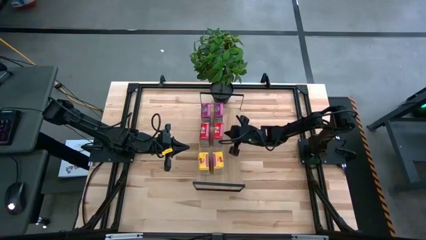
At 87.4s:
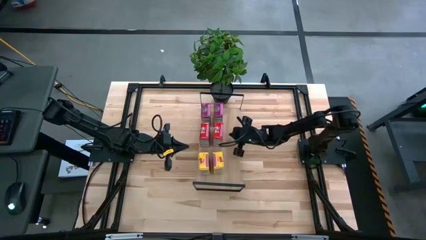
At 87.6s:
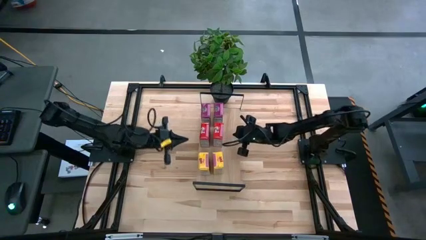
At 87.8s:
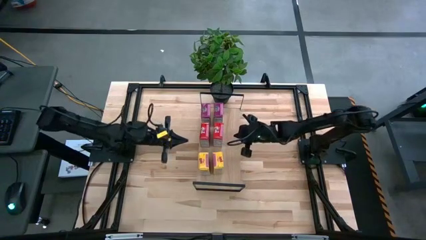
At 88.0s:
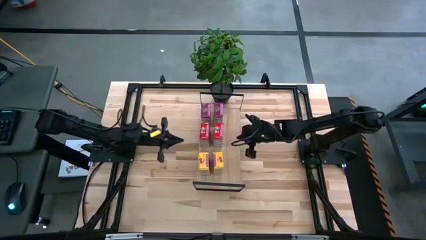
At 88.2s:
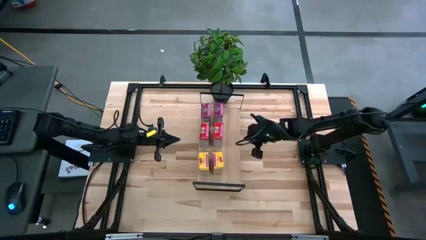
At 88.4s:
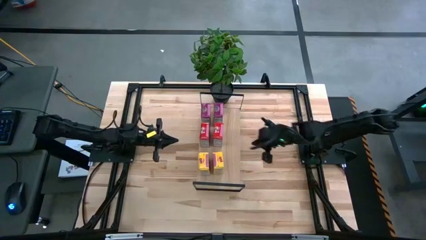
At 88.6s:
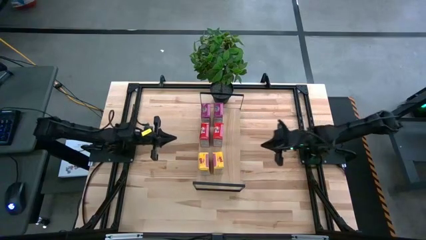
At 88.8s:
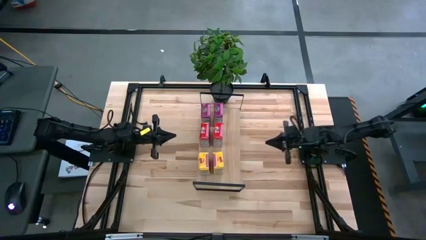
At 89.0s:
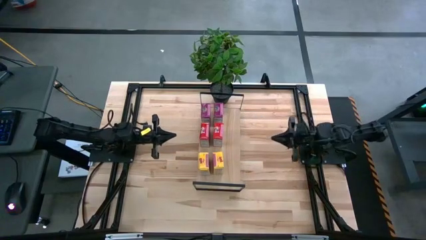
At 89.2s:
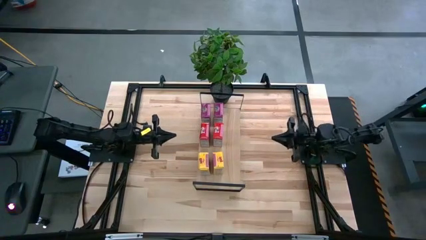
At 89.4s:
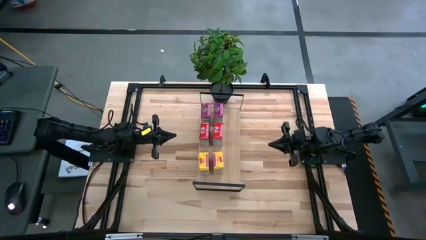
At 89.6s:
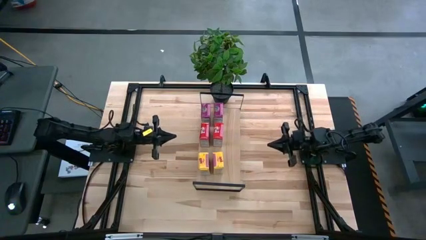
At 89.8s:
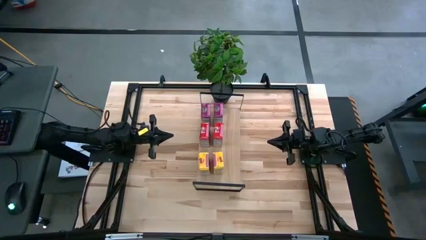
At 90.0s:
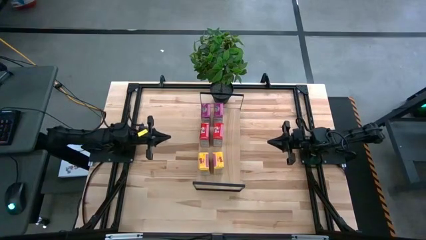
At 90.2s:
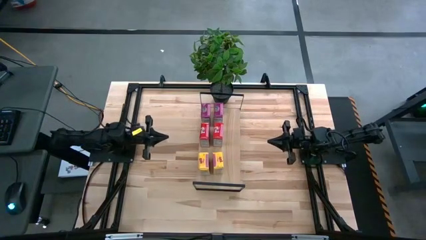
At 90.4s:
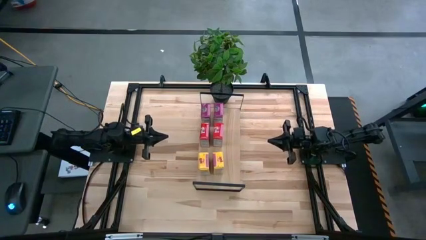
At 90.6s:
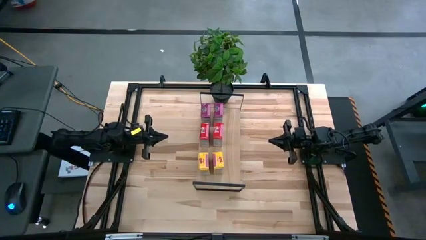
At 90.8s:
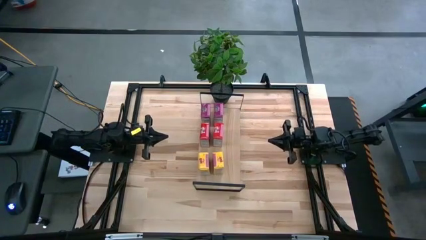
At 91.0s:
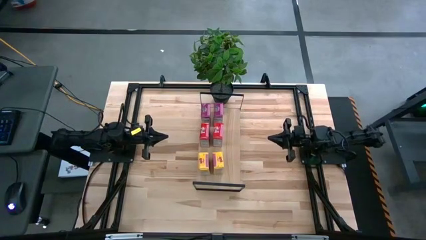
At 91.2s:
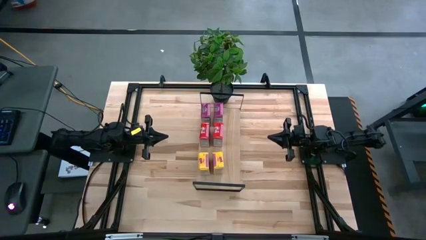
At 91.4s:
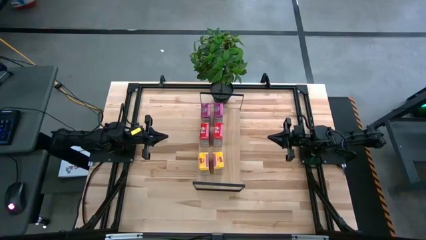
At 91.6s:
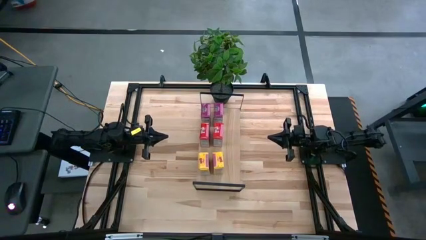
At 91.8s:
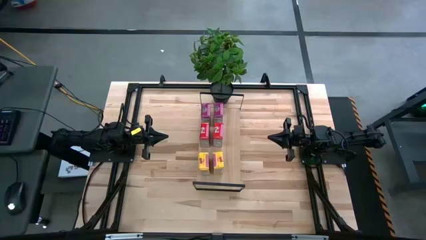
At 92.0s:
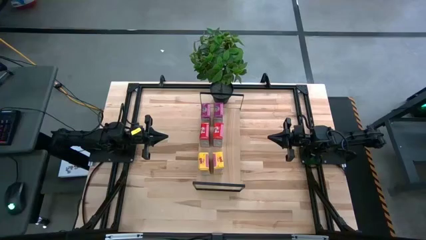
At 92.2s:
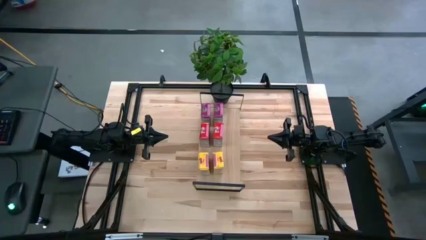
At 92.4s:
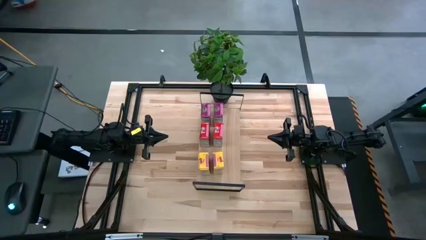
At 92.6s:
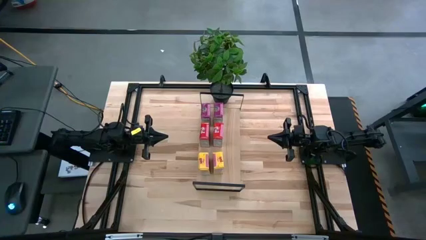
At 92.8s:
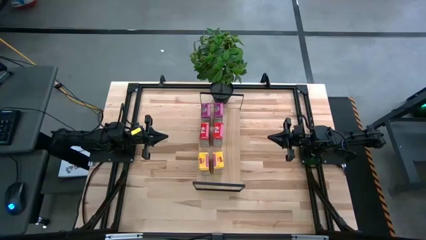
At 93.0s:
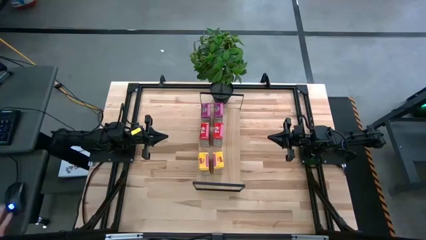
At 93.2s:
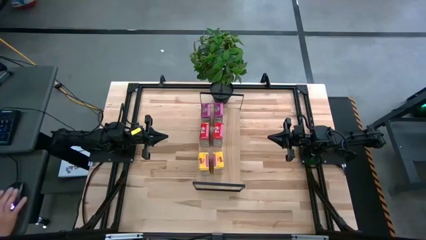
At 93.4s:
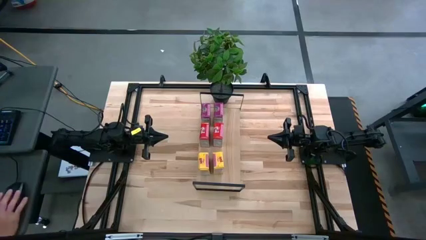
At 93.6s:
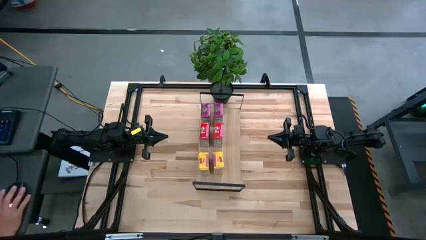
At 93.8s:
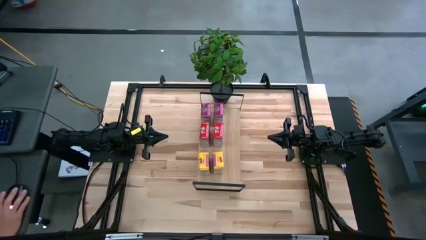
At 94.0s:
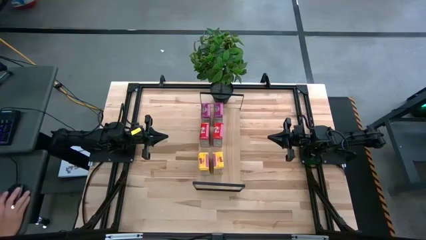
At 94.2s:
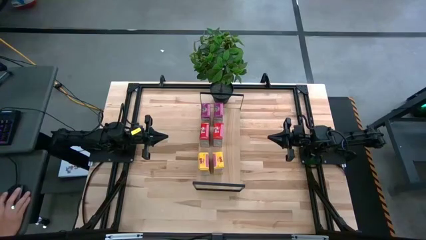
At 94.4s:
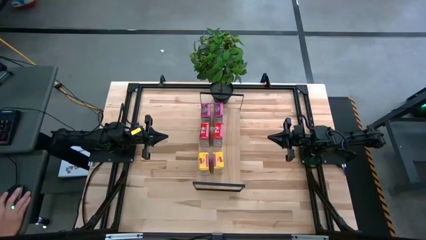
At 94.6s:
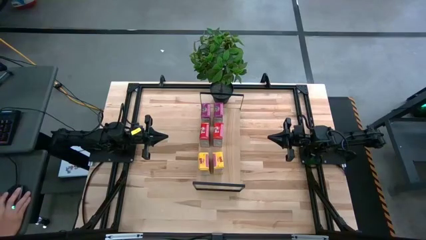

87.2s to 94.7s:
Task: Stack cereal on shelf
Return to Home Position

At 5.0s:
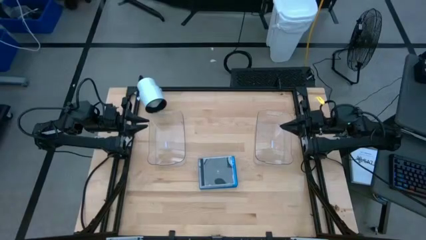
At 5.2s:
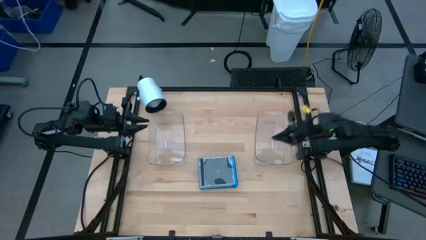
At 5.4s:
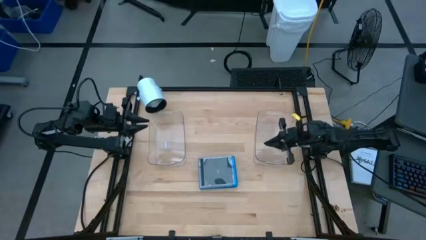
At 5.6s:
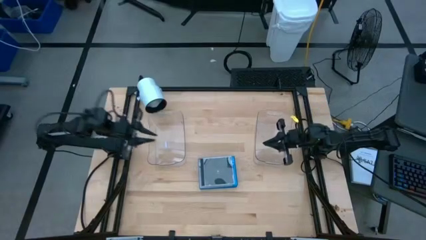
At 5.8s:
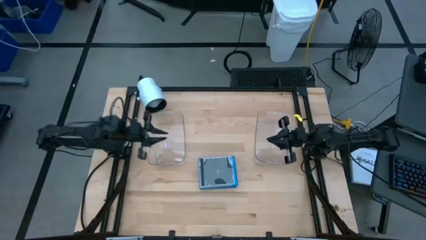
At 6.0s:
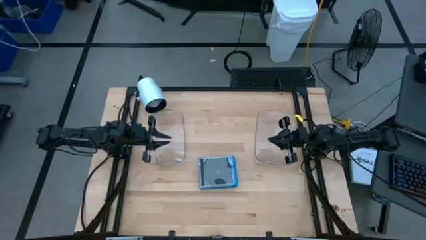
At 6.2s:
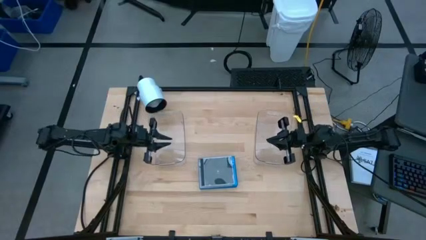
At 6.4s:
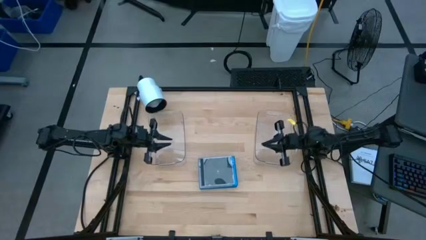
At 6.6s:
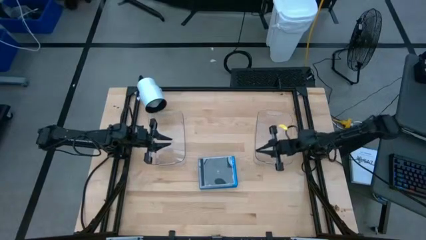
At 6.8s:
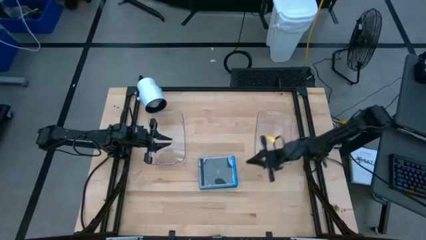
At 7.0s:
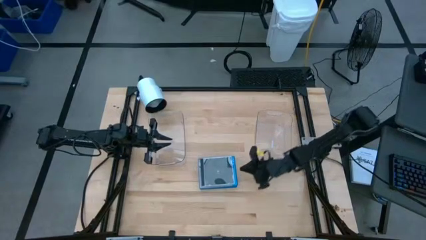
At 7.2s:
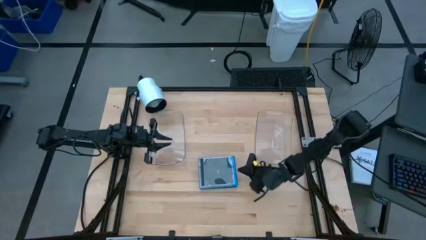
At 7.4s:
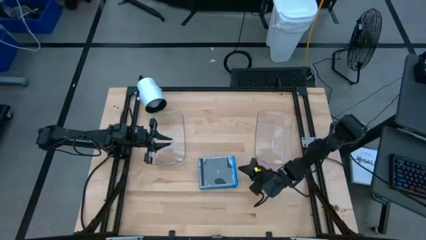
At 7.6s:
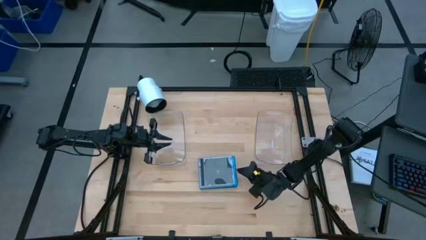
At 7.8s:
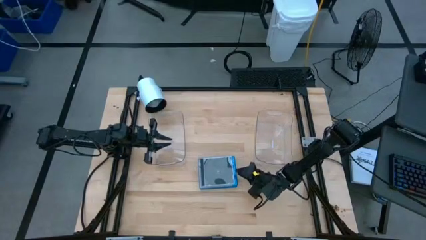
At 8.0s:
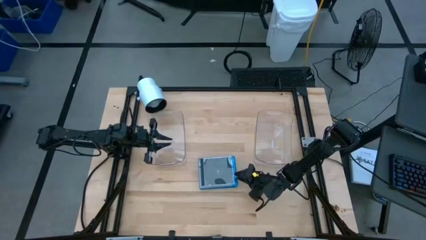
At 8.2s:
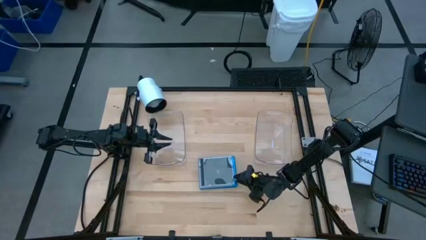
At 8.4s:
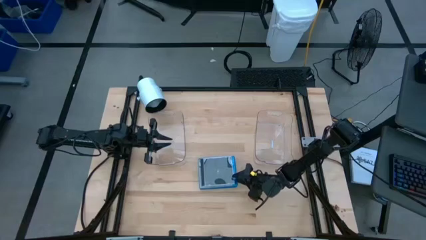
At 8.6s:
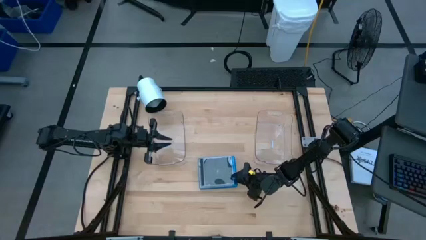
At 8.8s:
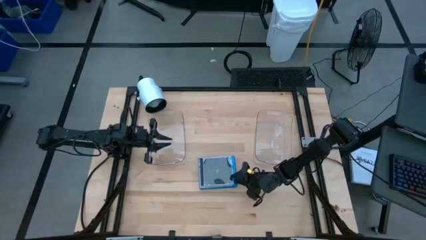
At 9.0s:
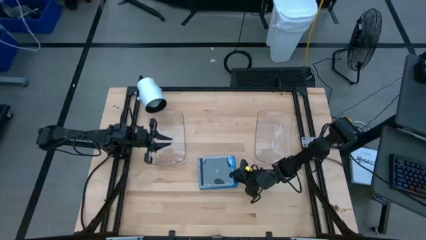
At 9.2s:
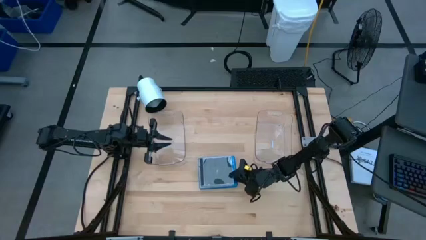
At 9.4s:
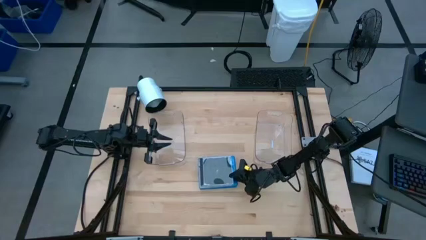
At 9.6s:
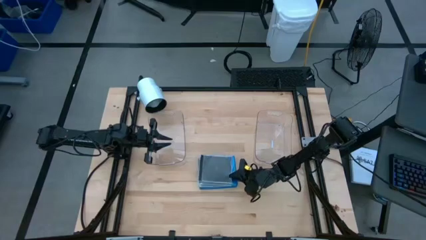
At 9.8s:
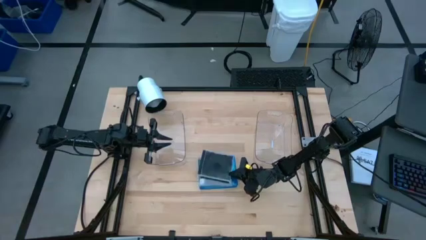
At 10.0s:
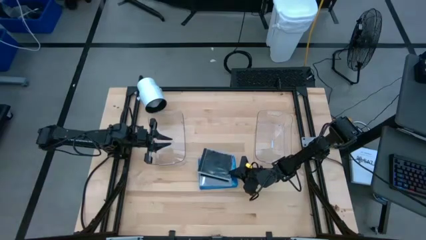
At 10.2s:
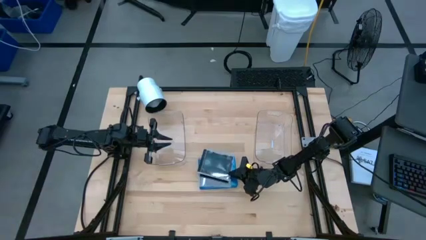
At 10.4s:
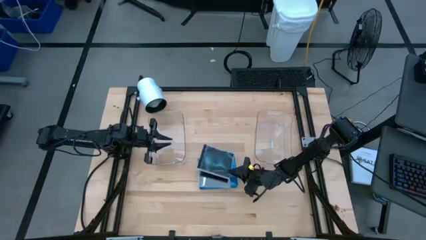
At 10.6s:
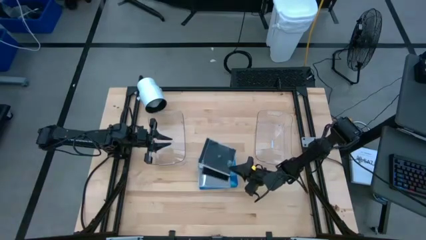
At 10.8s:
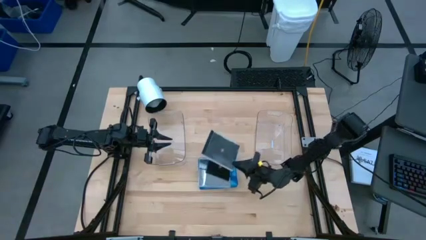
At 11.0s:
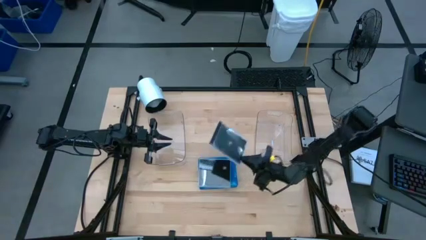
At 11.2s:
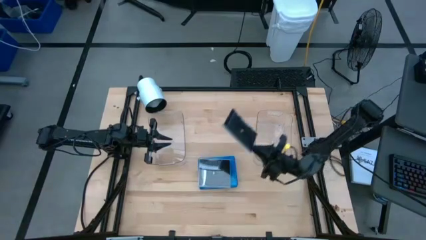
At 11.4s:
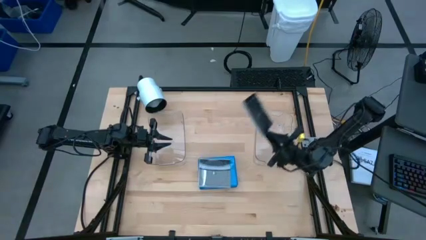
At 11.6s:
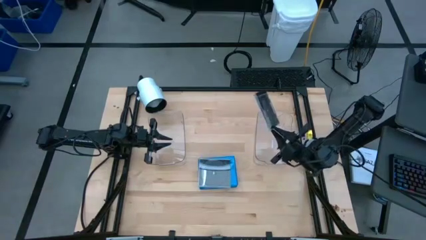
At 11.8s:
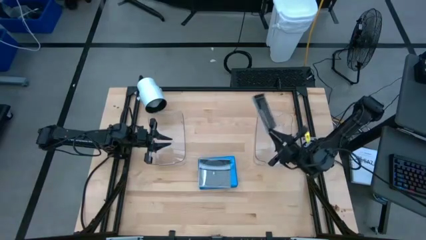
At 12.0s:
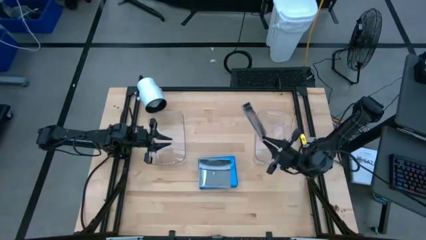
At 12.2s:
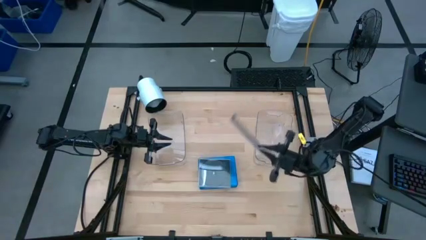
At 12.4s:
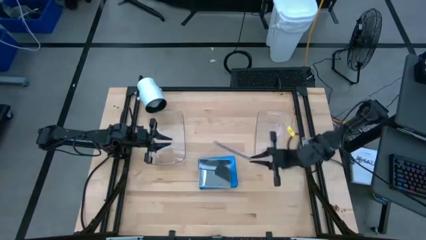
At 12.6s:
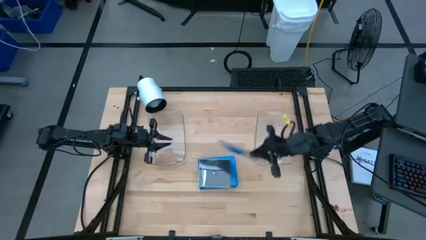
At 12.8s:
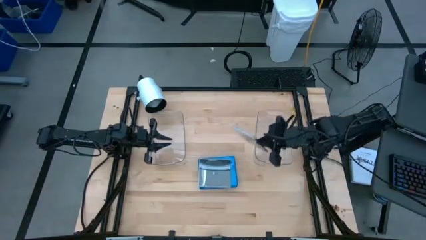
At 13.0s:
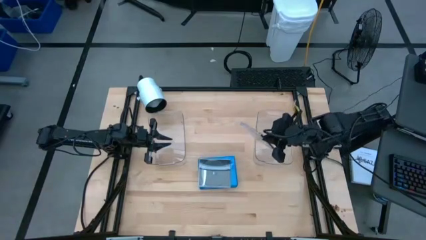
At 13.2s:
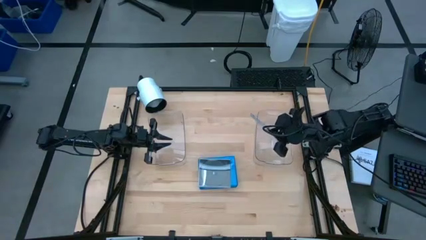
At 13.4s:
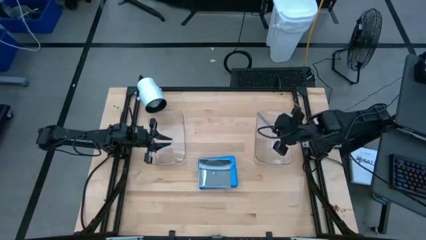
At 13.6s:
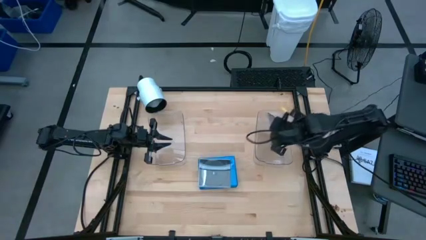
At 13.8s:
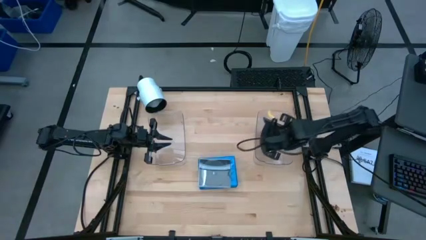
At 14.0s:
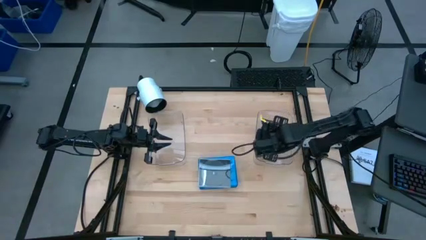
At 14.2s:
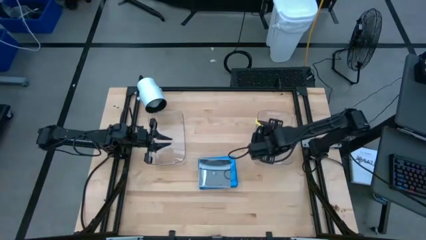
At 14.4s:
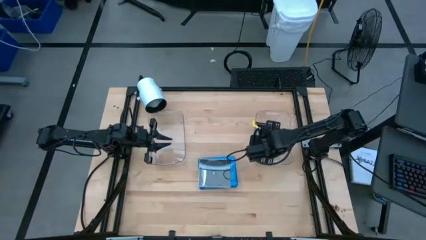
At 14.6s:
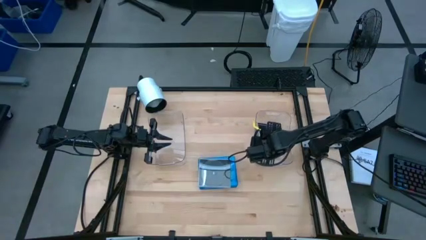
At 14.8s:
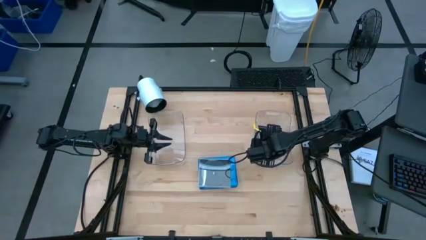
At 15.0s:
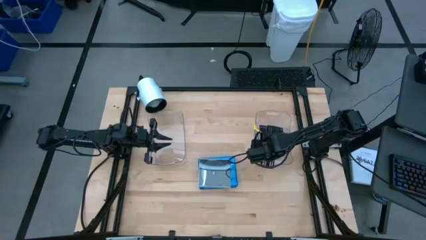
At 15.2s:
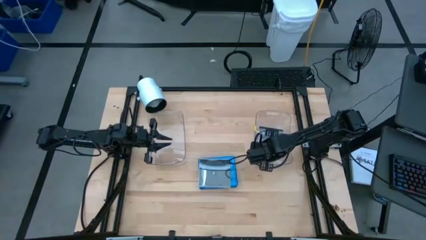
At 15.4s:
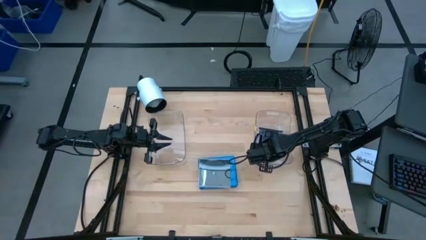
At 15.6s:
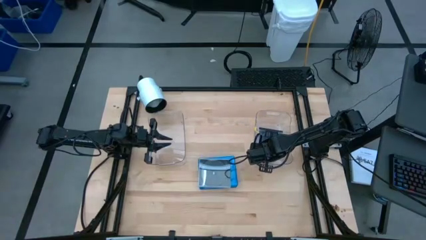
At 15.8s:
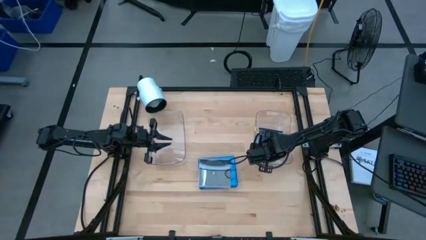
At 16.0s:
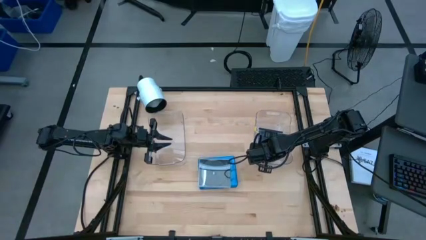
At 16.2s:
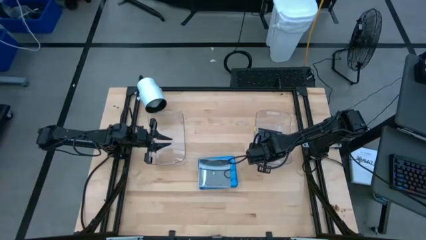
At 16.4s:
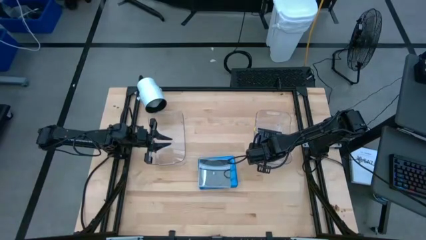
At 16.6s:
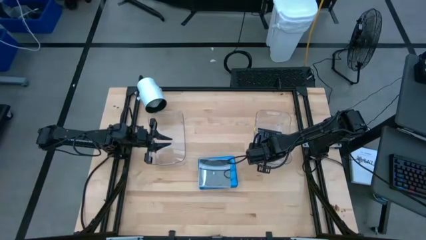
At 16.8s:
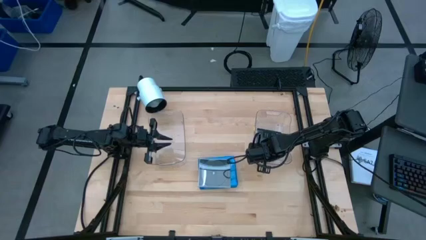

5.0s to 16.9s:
Task: Pick & place jewel cases by type
Put the black CD case into the right transparent bin
